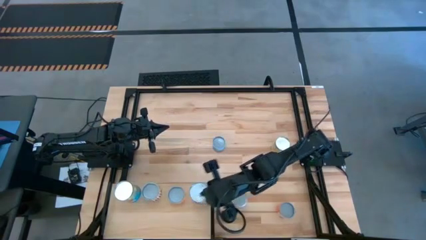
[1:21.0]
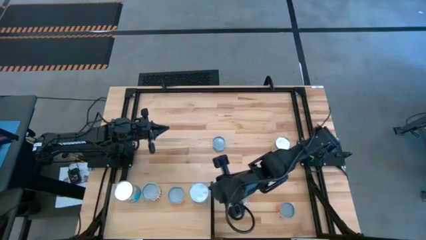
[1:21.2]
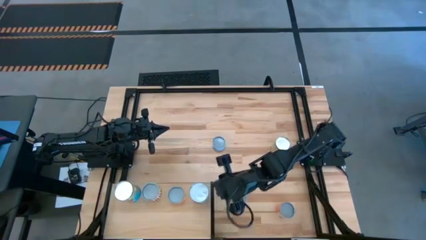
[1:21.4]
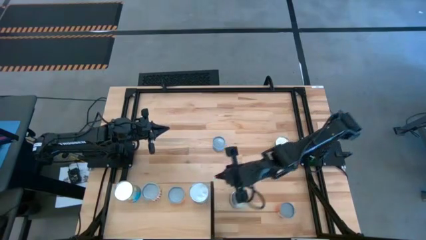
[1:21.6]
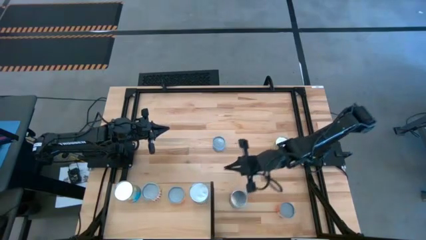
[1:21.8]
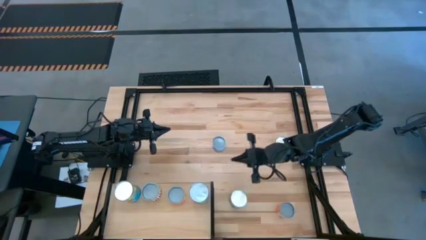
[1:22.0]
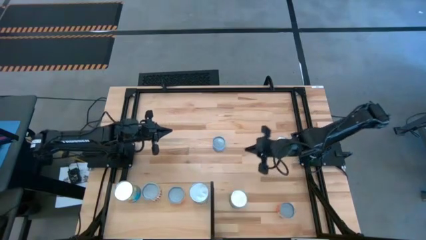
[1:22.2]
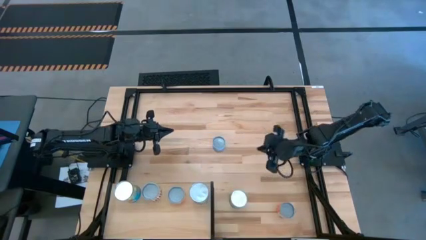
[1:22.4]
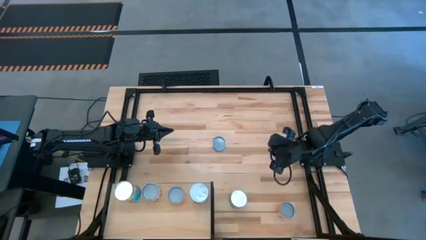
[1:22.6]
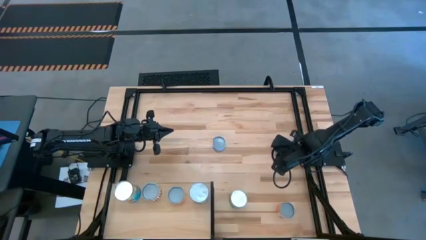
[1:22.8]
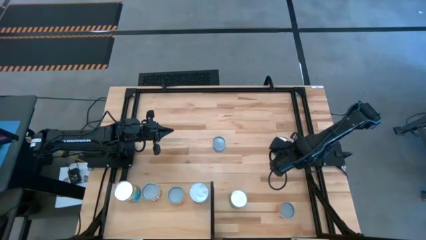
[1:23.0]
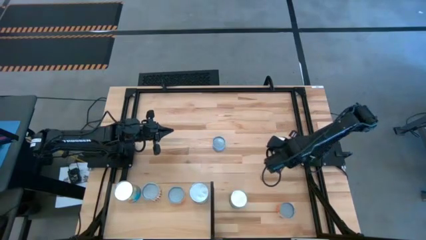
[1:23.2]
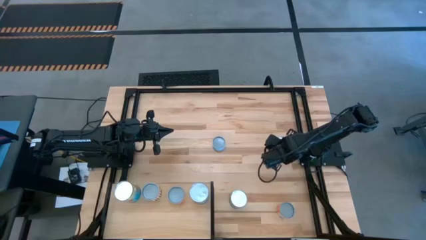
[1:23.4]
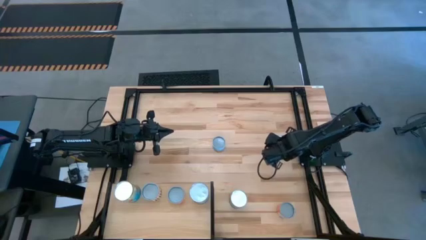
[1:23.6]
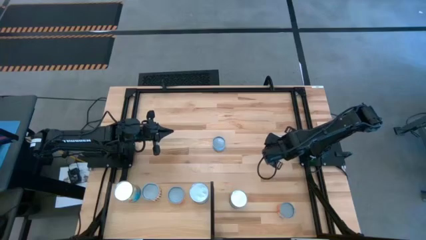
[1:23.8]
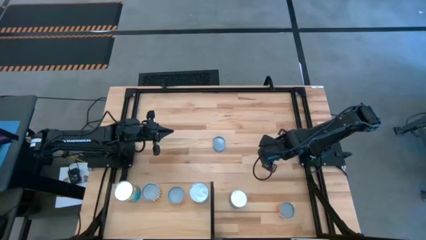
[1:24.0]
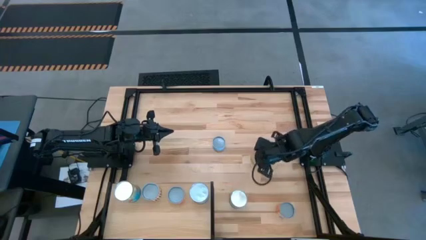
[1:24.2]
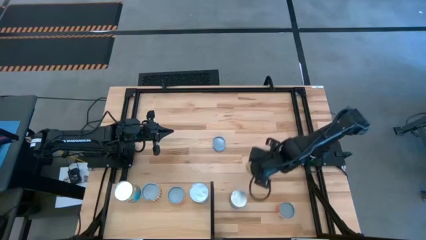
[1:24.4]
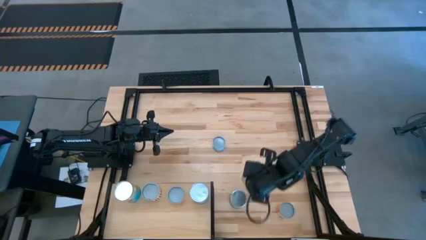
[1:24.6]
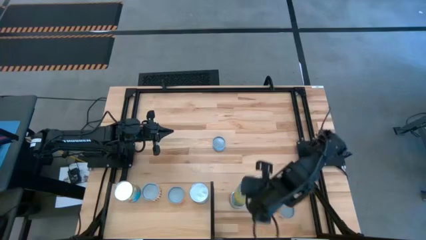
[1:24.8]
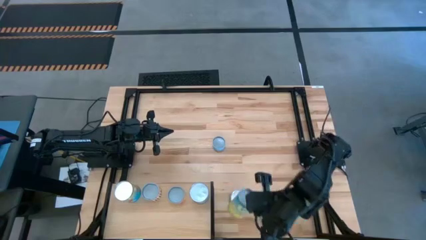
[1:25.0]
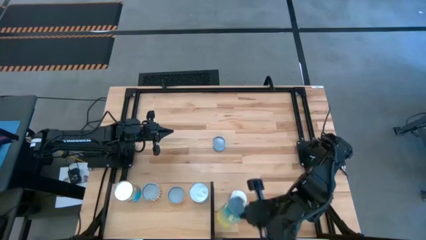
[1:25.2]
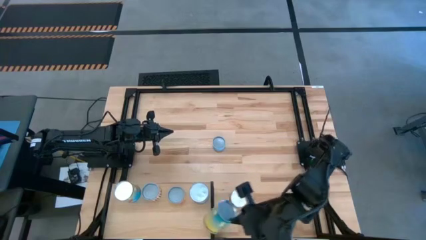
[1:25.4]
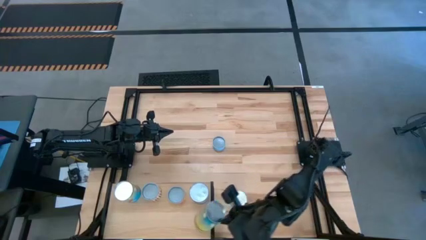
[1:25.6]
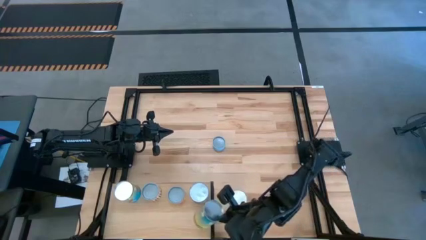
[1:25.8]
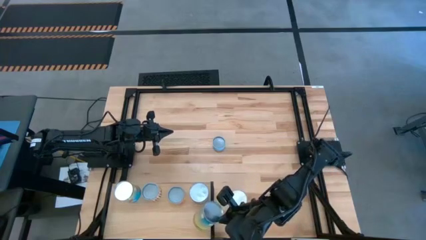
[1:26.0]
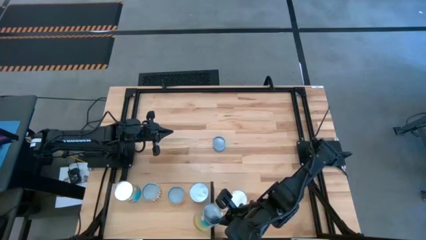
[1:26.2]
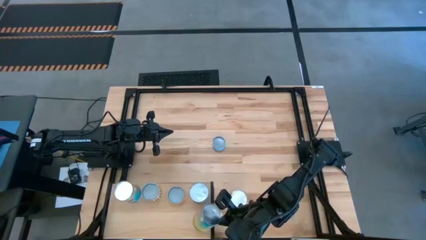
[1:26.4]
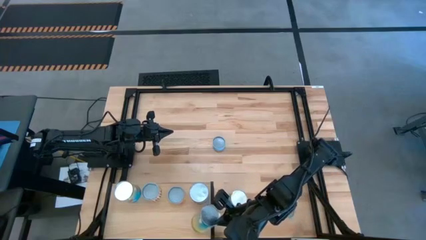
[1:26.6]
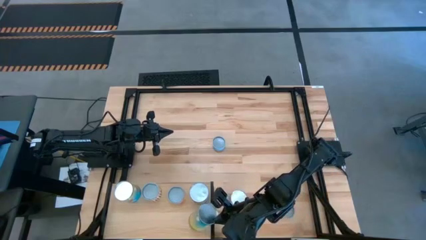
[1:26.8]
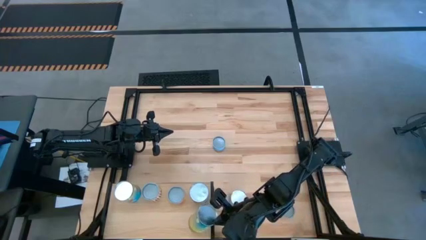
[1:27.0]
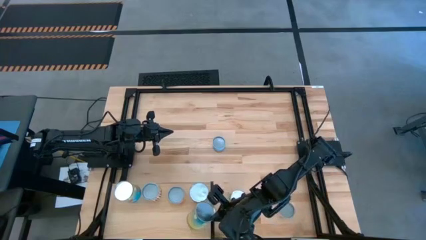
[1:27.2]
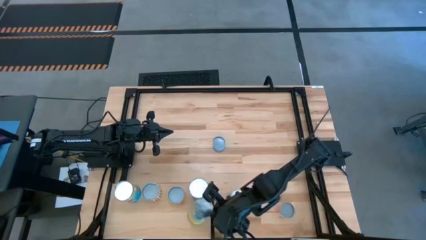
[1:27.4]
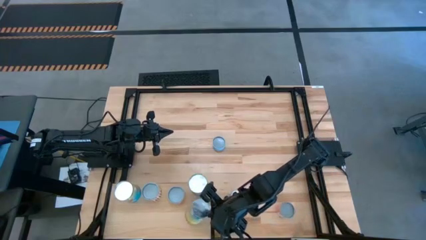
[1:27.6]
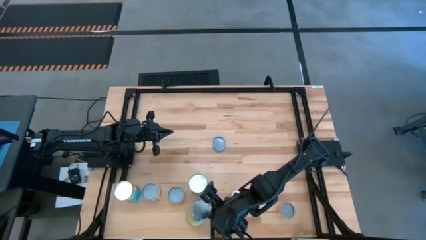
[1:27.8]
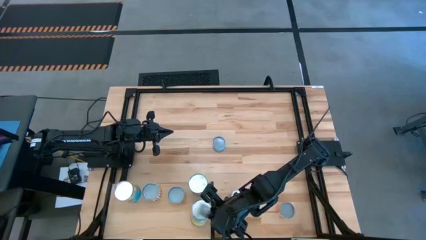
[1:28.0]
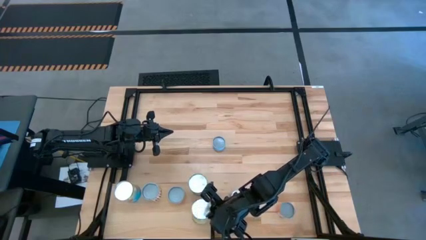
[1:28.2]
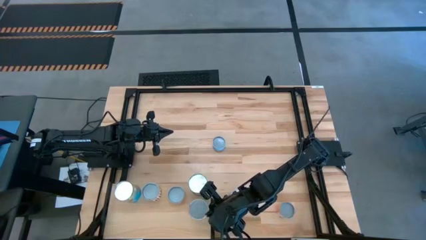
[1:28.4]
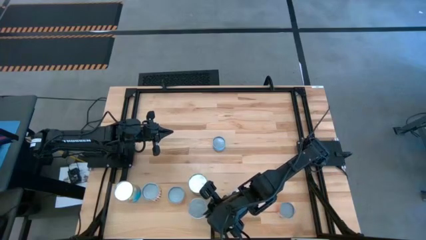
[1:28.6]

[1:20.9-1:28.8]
Task: Pick and place cans onto a shelf
Put the canned carrots on the shelf

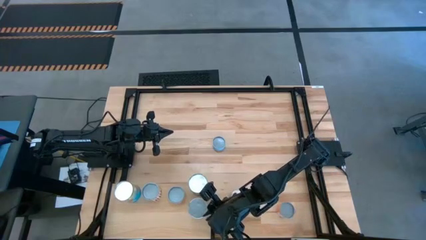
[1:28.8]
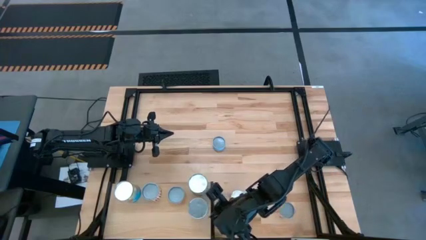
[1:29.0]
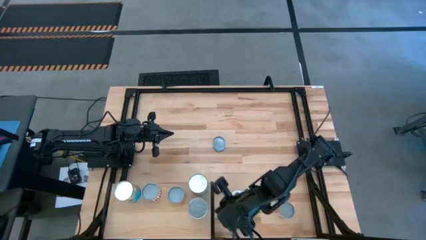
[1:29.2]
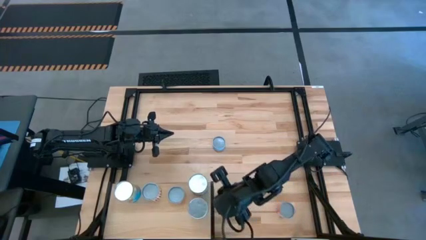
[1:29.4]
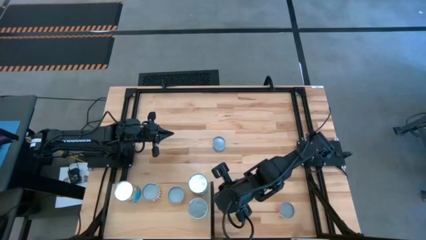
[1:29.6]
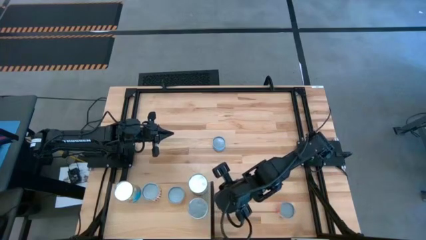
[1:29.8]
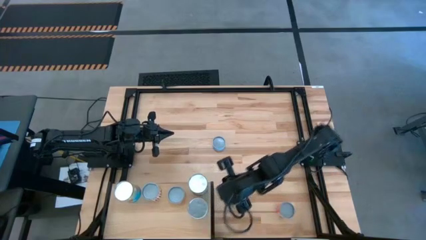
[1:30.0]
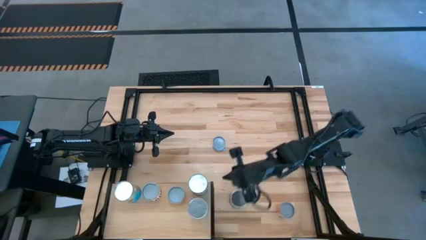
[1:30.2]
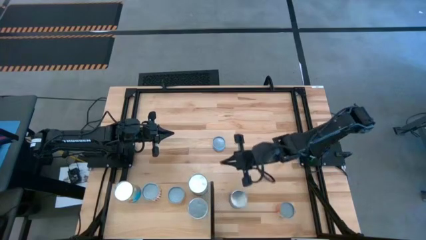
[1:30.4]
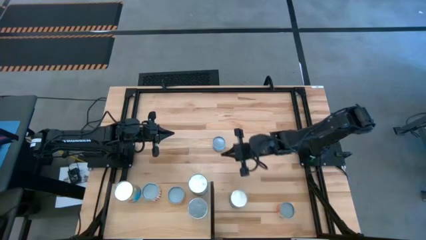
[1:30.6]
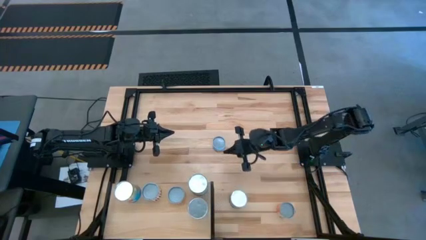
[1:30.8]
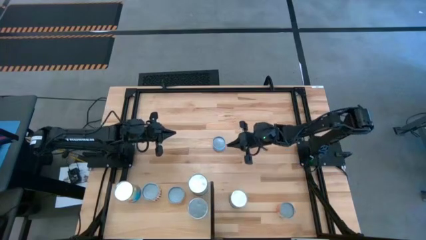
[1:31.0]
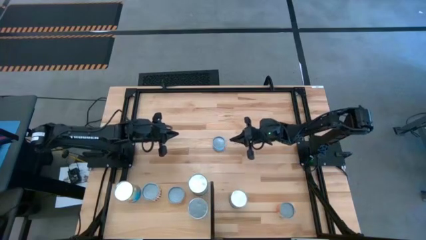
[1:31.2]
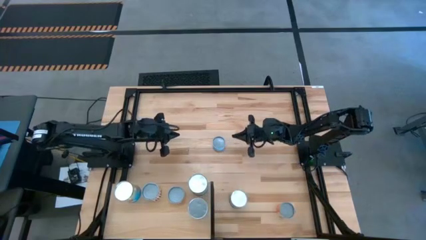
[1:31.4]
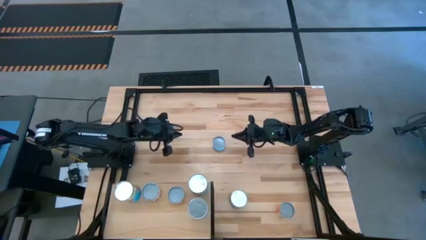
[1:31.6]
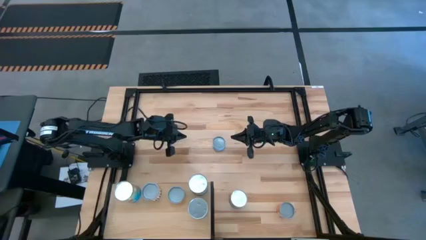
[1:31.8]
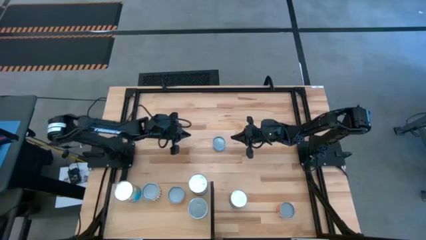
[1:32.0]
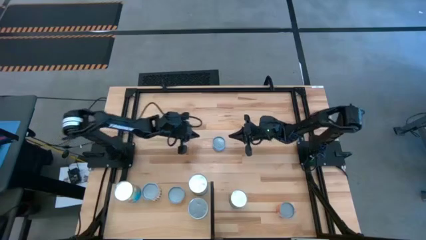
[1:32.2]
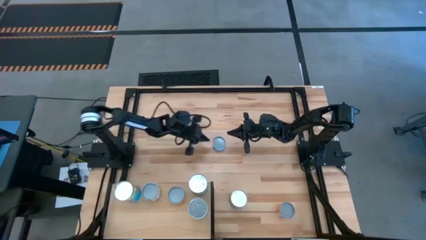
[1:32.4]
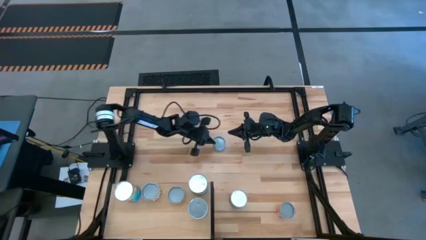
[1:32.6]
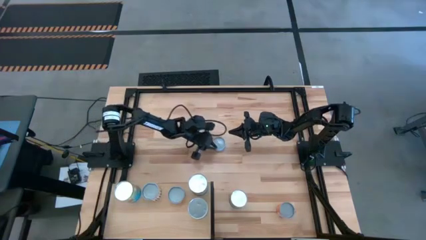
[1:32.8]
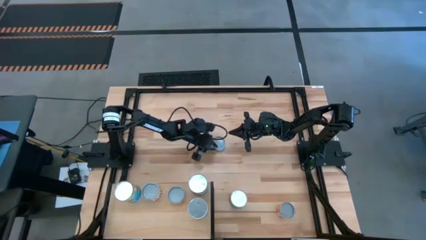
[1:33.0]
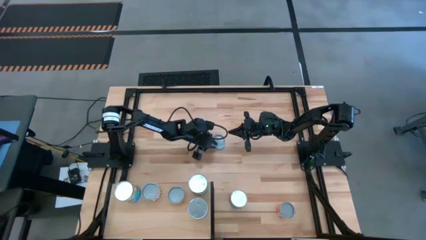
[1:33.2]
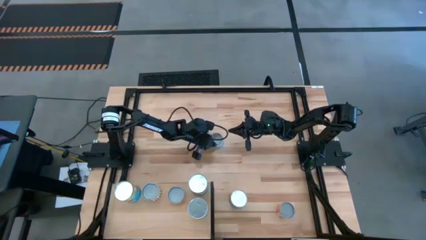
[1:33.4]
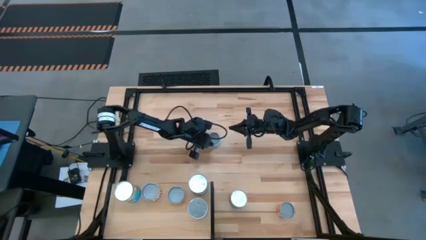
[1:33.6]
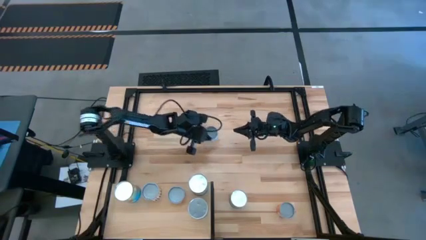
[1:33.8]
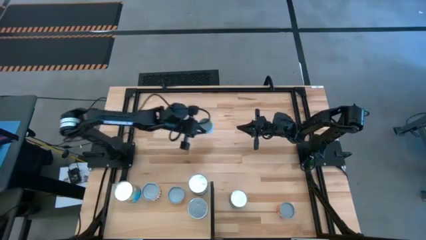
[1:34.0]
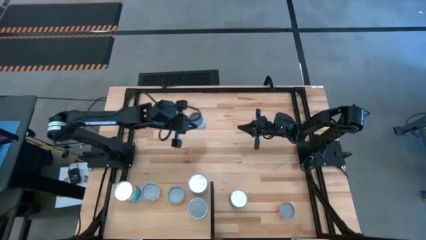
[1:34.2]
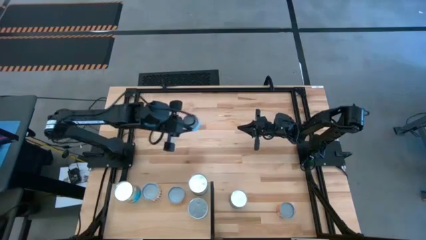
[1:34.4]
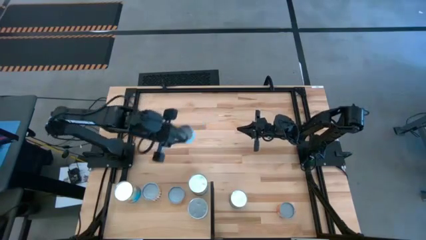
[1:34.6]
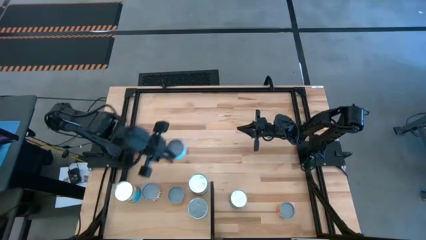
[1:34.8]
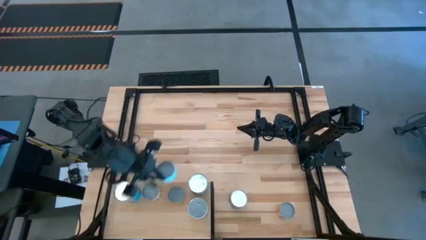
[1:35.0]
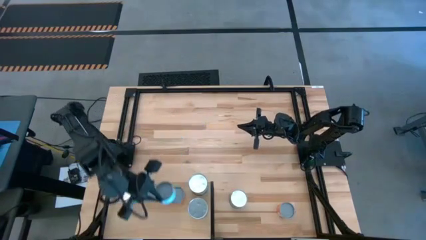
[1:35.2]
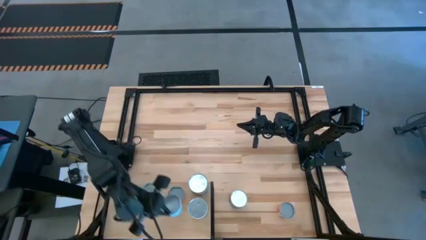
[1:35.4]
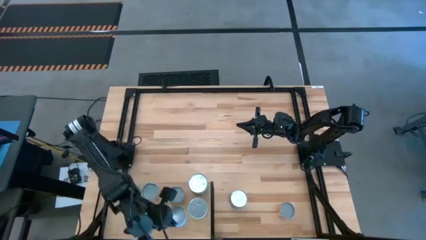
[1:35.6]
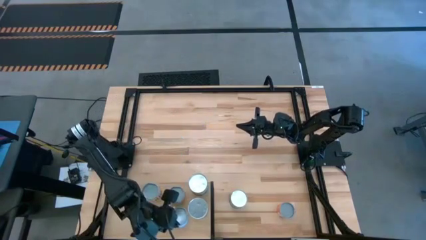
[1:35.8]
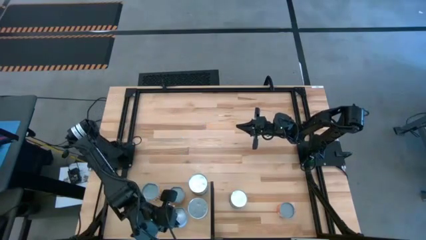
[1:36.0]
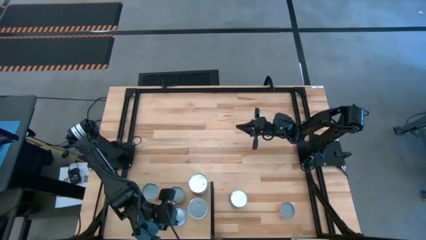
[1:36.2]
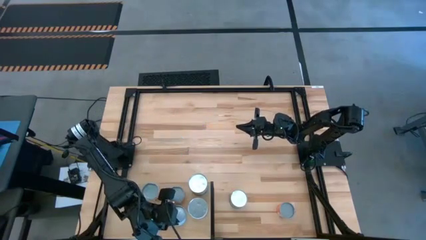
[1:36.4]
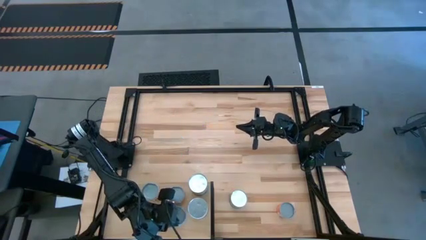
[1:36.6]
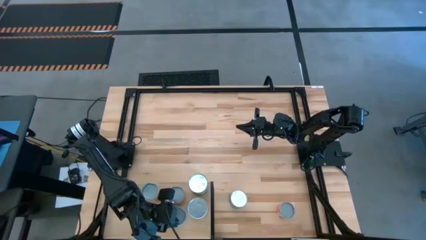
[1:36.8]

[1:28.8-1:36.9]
Put the canned tuna on the shelf
